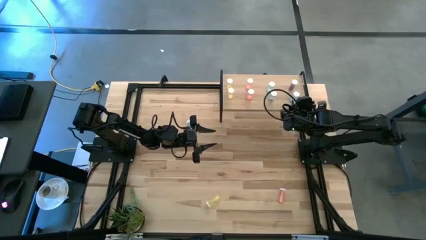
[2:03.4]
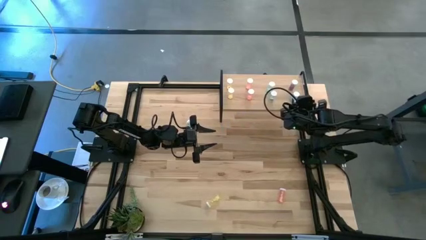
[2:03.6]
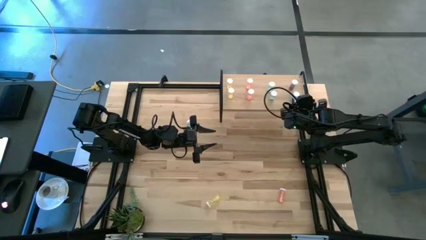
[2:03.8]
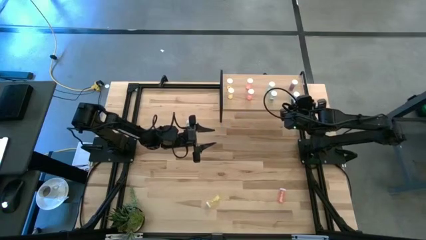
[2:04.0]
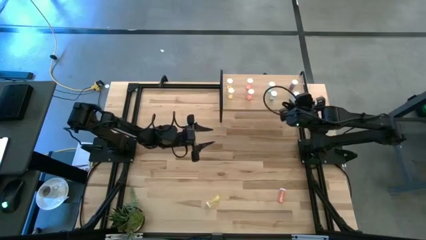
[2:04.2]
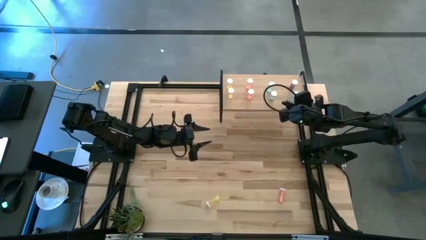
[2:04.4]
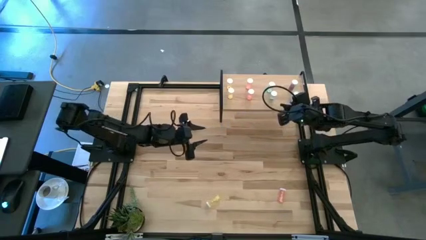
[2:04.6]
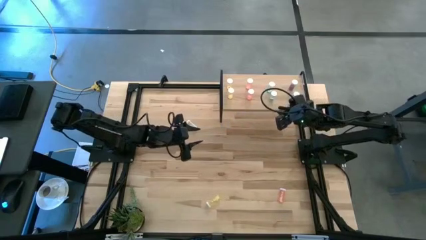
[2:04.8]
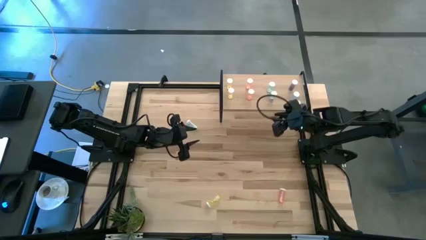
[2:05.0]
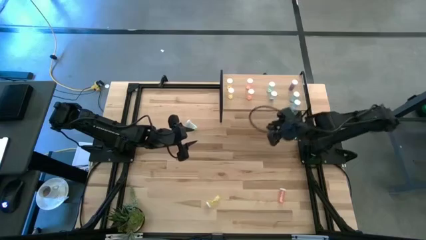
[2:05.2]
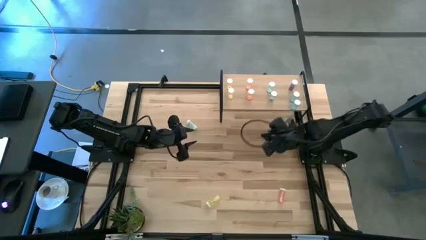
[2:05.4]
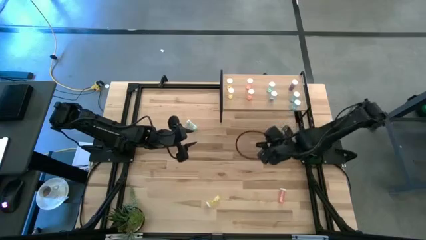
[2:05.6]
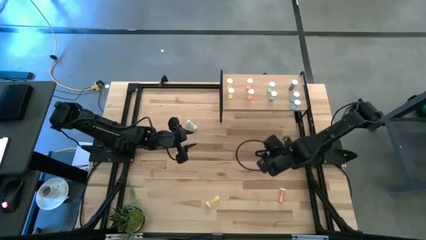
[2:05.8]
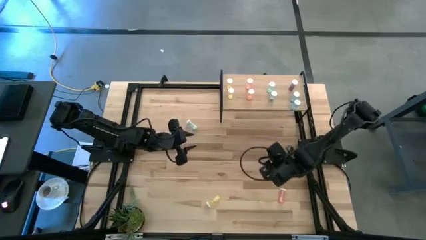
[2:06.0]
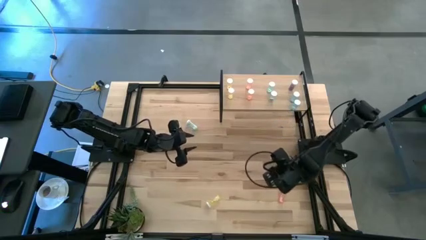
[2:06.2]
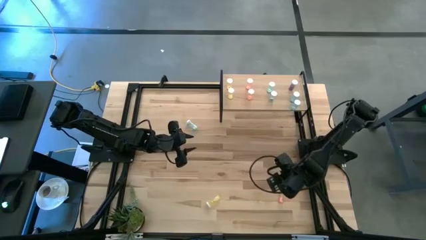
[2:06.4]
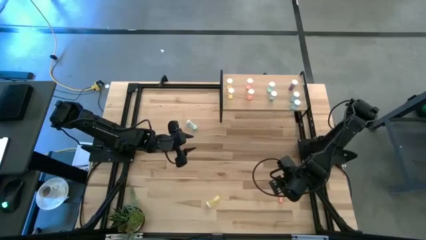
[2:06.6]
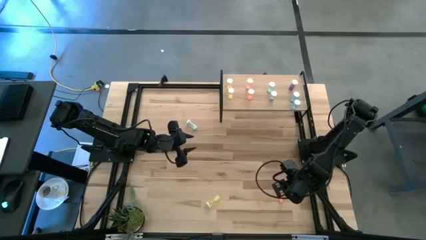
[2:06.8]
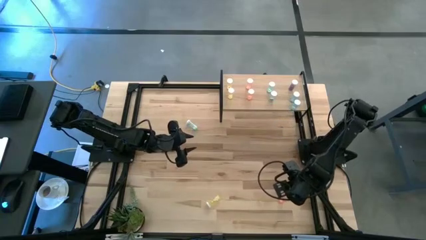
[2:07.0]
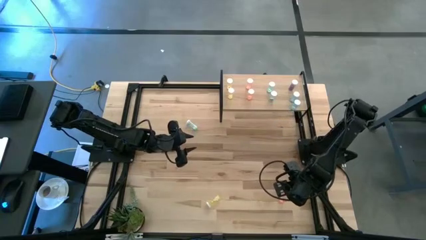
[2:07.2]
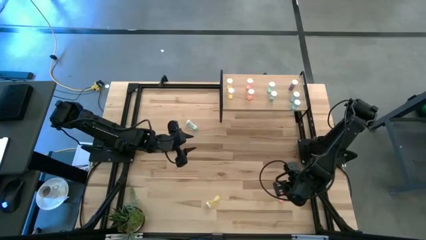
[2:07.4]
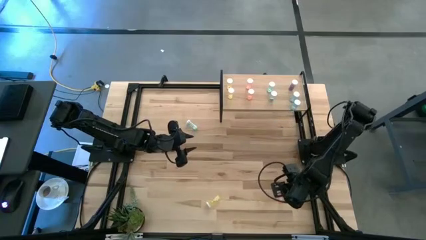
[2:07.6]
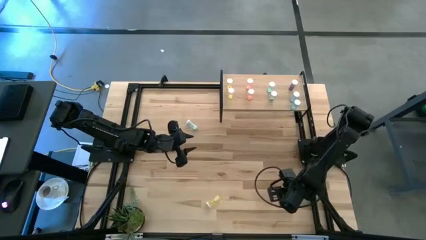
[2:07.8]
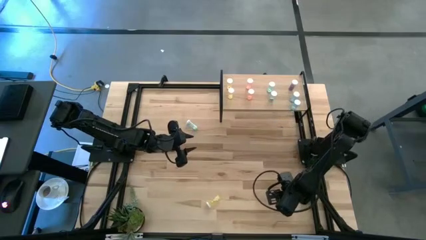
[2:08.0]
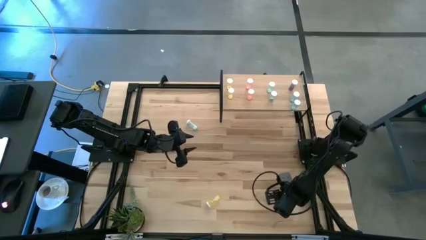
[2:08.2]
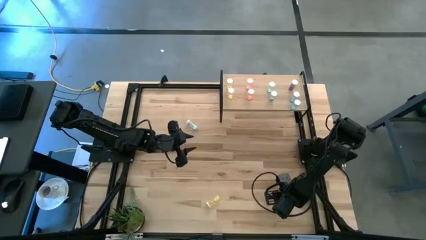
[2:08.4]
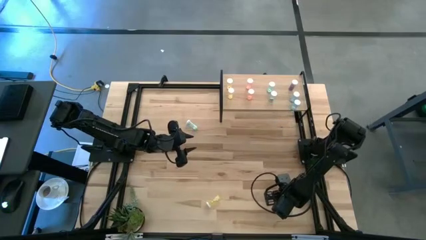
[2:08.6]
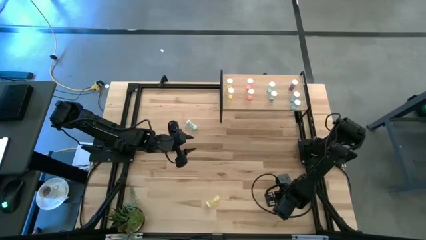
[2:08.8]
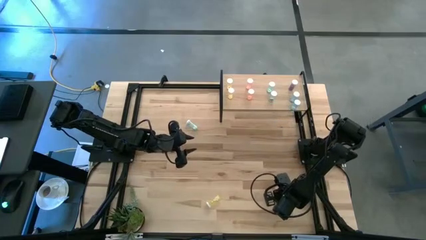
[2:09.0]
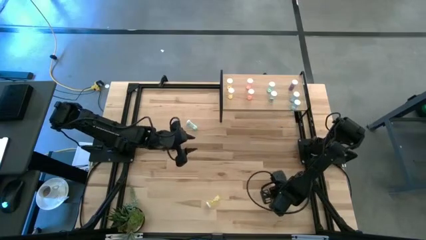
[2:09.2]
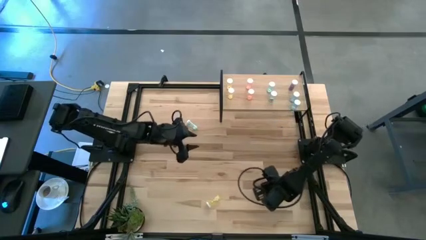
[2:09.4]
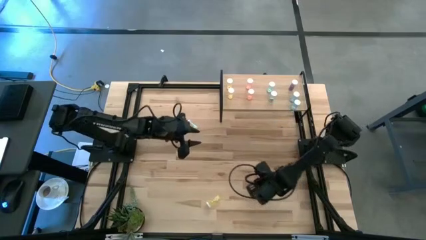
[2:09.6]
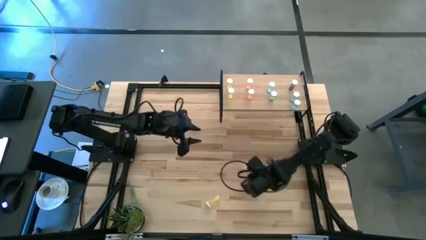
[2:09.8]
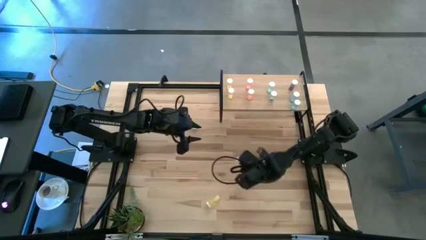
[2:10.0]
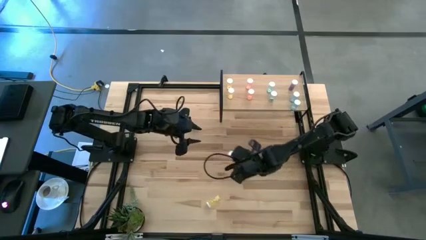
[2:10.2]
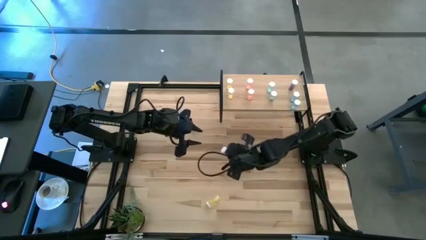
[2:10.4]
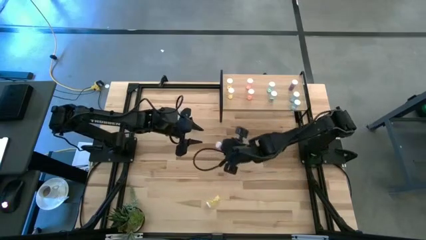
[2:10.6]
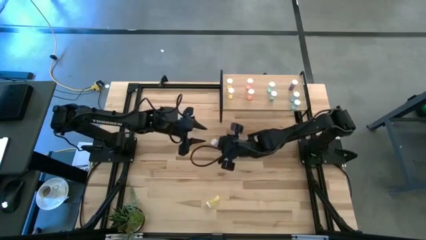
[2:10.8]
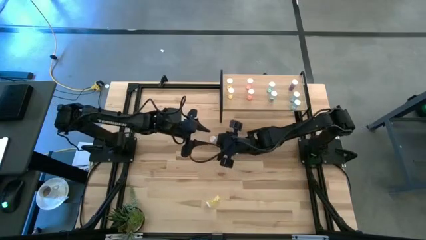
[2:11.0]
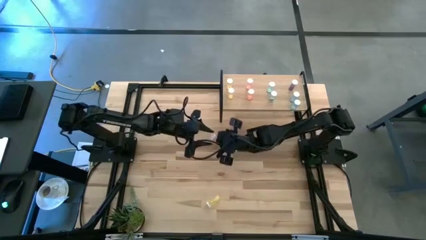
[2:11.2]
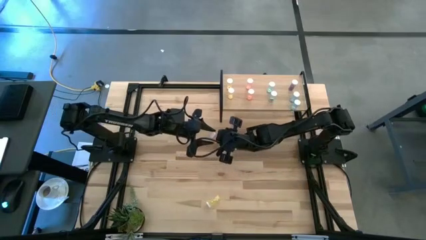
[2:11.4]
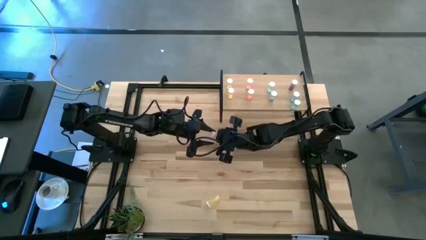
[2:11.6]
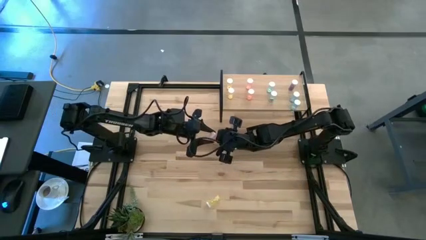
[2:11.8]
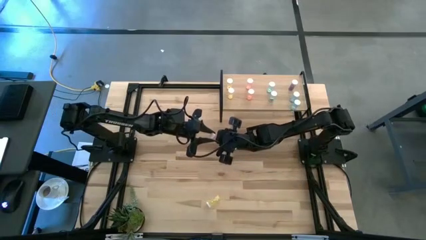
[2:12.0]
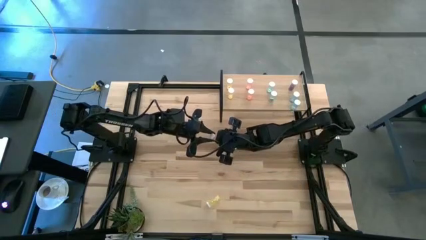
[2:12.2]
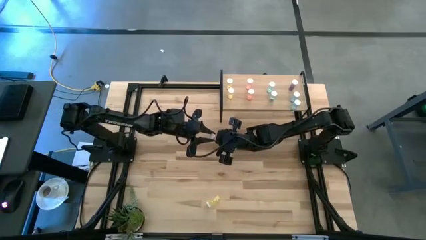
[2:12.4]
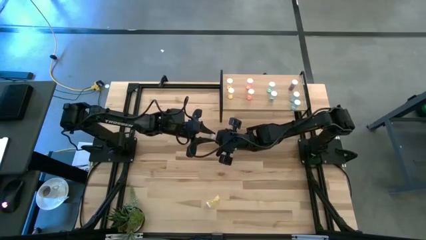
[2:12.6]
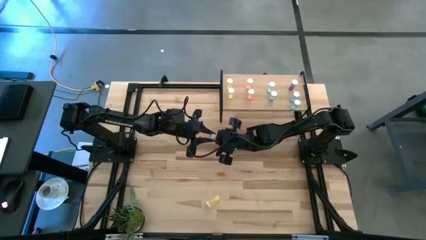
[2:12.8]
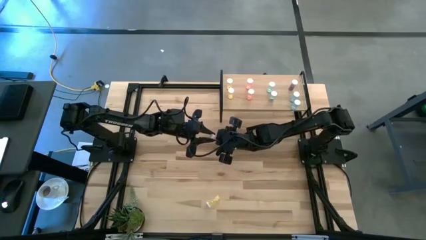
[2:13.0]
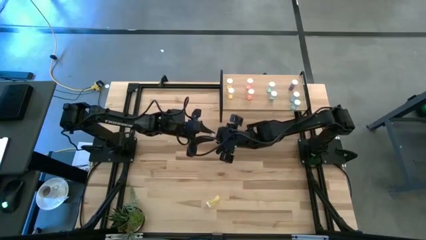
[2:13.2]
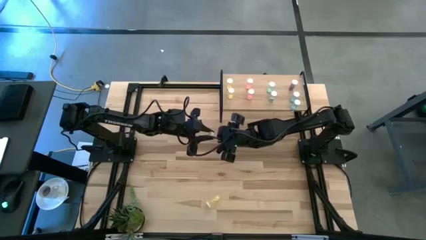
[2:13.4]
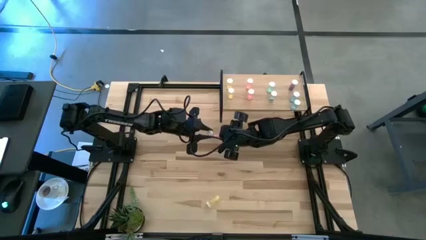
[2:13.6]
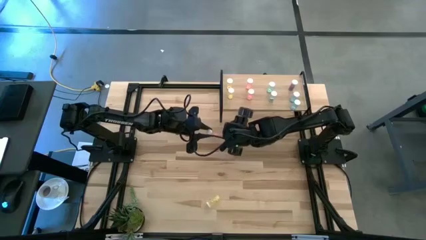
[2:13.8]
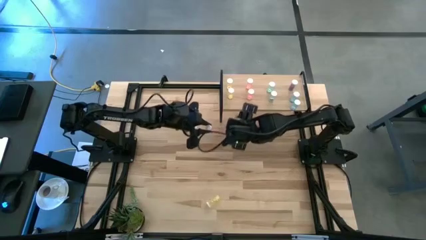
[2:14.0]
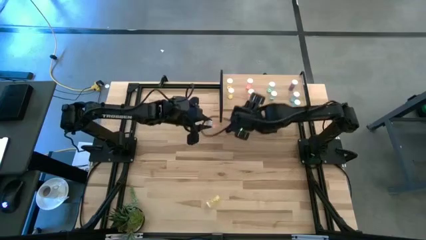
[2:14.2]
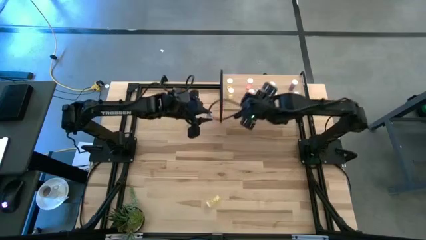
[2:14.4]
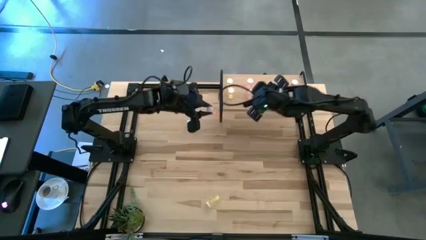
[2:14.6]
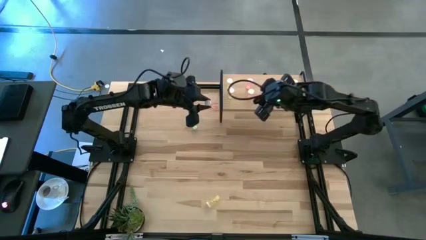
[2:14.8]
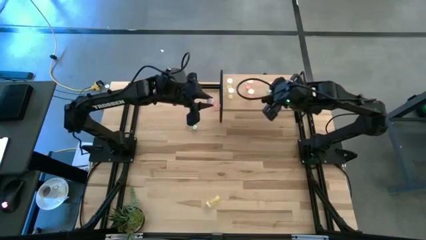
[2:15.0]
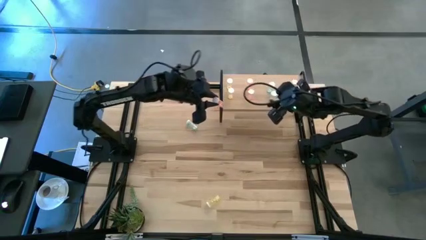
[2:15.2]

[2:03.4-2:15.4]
Task: Pick and place medicine bottles onto shelf by color
Put the pink pill bottle on the shelf aligned with the other pink pill bottle

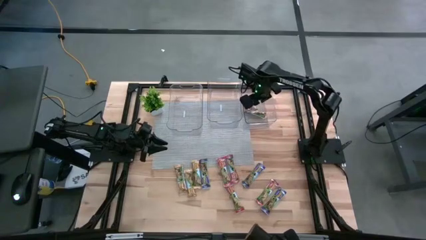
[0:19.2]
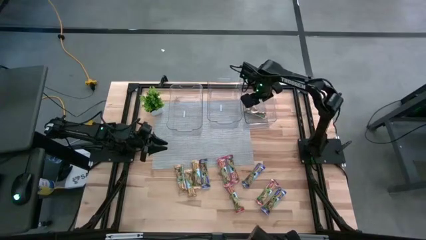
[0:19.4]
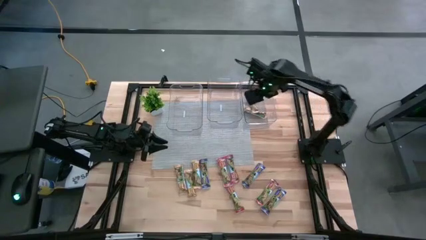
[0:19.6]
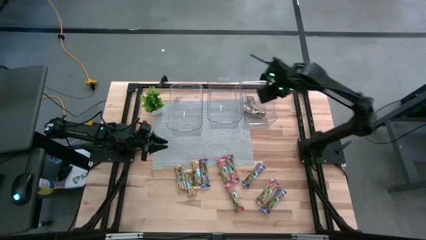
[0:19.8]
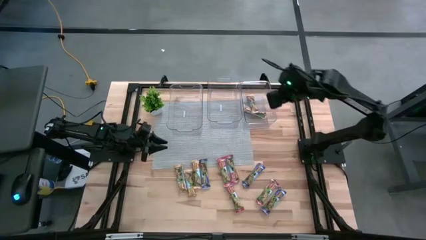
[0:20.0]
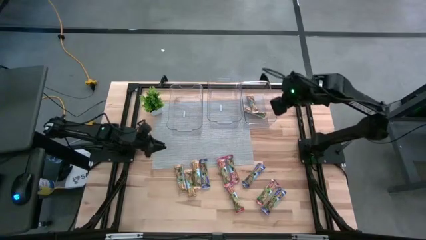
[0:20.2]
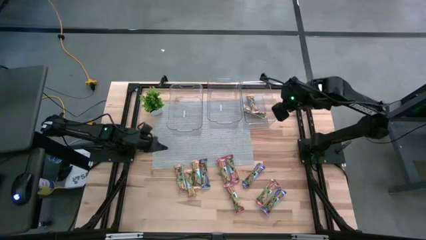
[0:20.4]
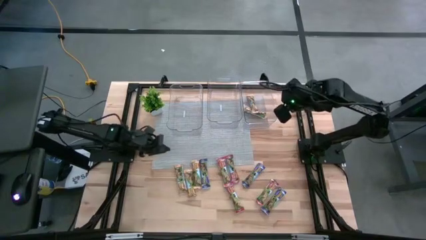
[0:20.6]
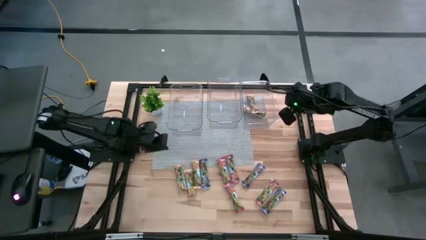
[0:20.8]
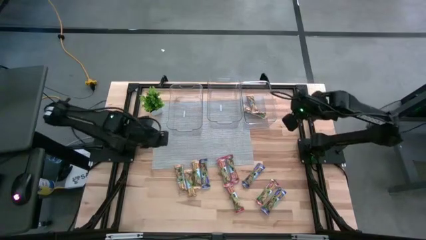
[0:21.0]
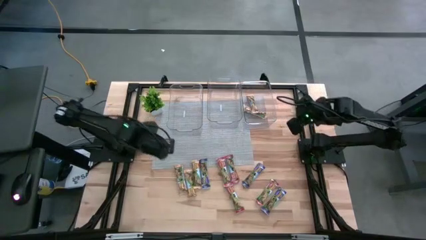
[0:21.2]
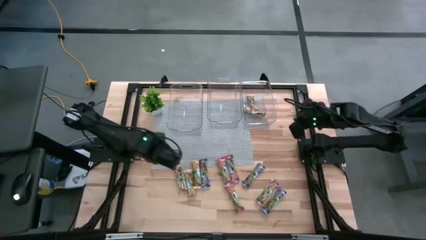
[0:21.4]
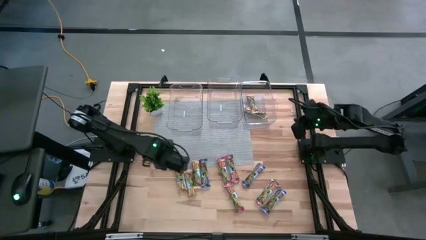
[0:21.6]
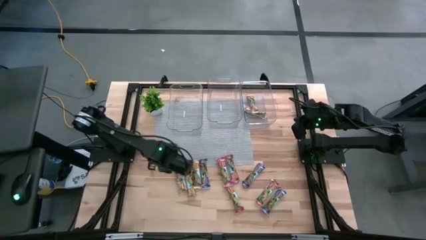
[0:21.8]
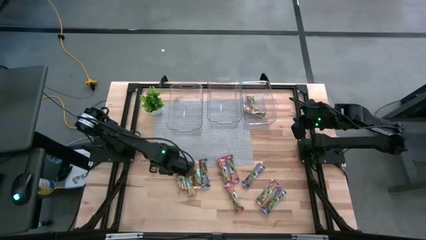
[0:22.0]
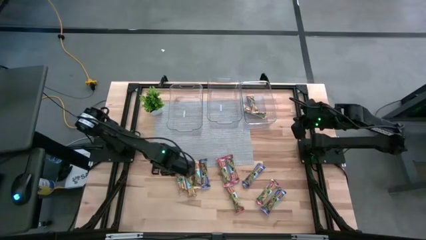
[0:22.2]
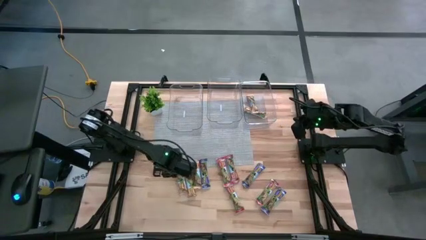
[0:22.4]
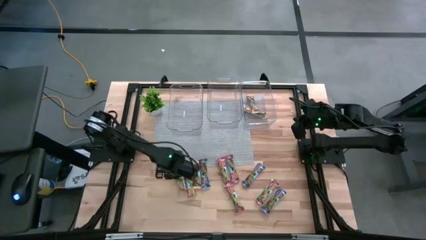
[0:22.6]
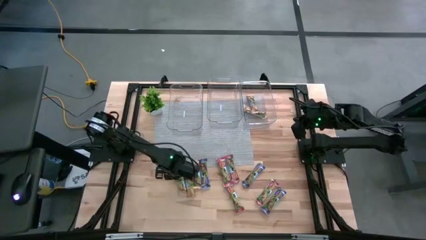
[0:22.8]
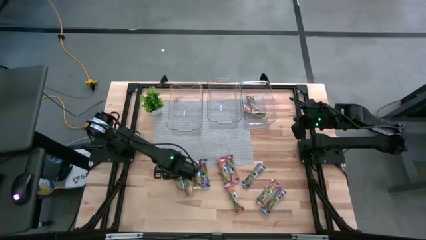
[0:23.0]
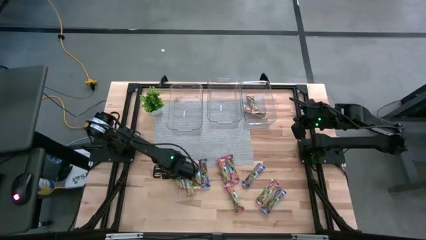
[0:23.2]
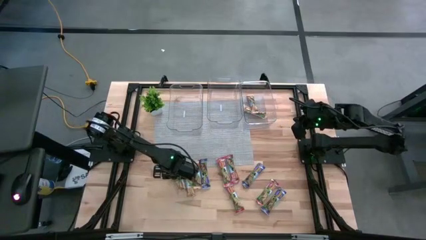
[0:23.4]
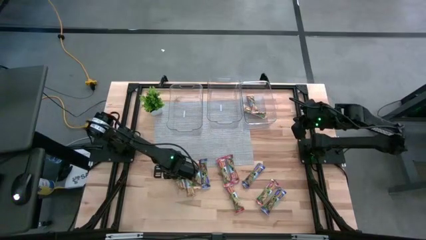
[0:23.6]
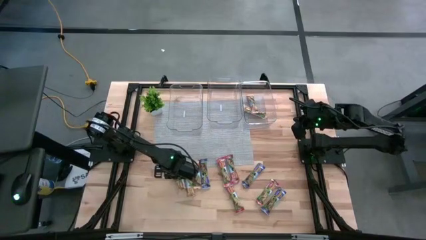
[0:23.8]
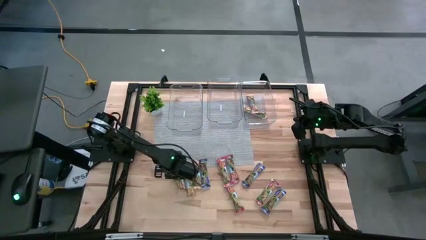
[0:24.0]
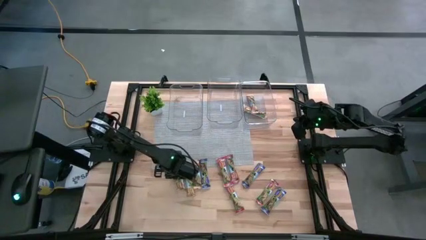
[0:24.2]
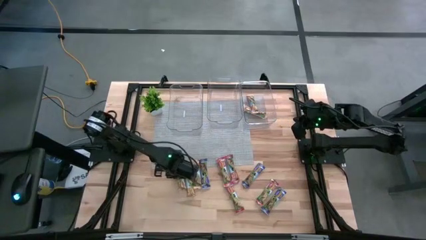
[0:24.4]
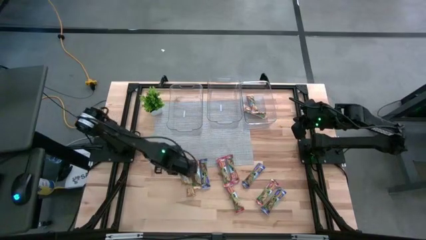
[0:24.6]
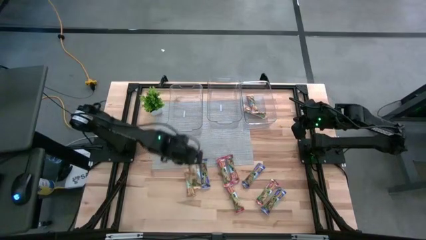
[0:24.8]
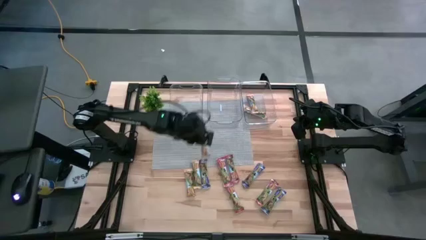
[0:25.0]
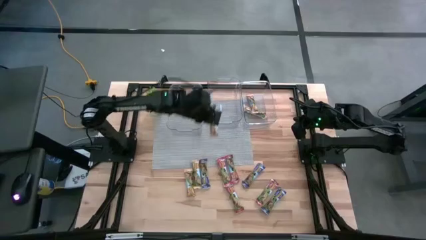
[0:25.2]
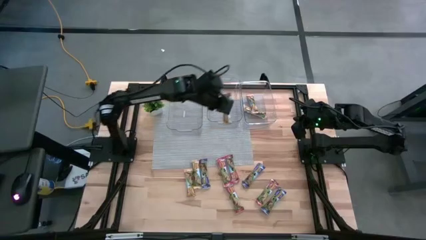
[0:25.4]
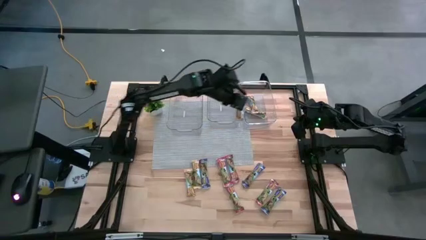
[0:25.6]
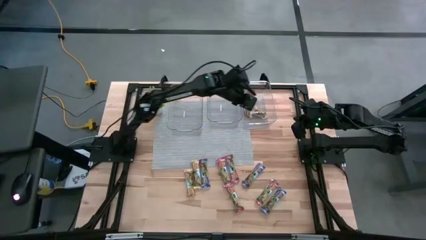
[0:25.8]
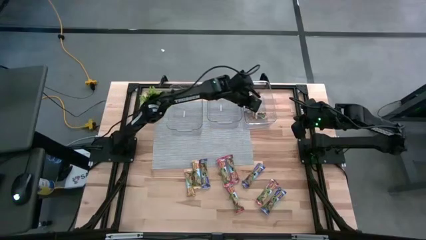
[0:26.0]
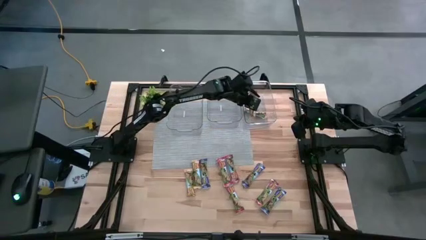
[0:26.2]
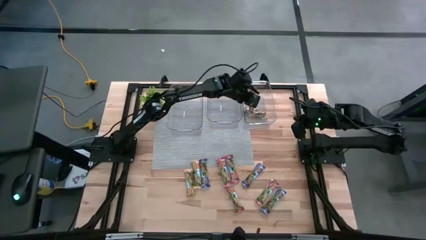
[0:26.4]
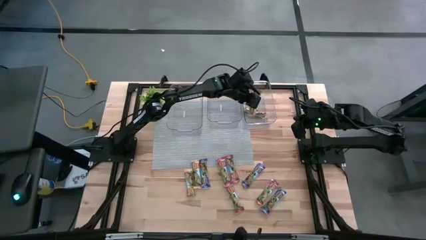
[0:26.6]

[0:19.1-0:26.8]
Task: Pick and place Granola Bars by type
Put the yellow granola bar into the right transparent bin
